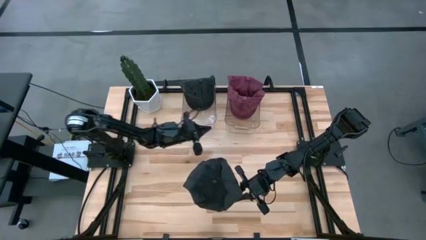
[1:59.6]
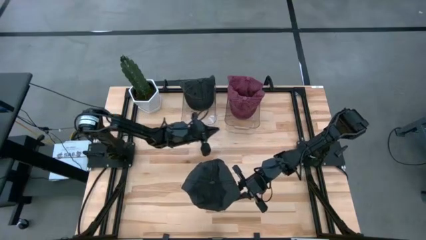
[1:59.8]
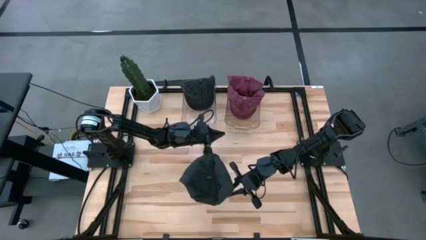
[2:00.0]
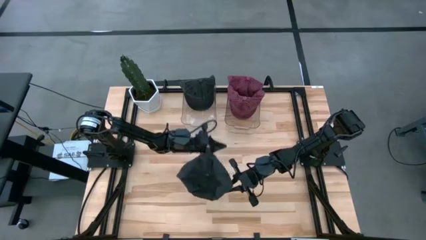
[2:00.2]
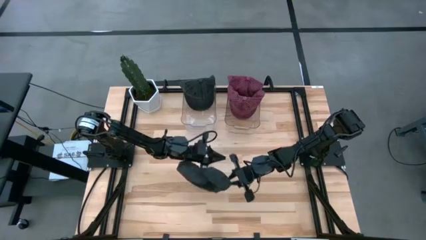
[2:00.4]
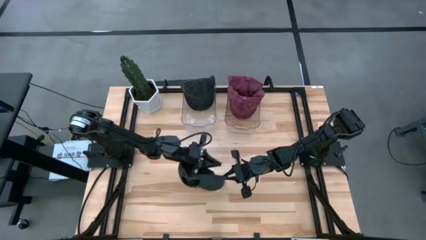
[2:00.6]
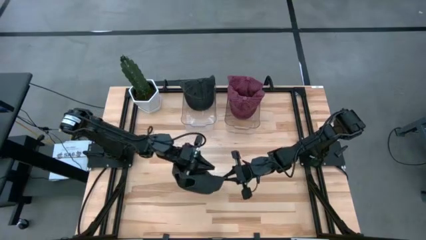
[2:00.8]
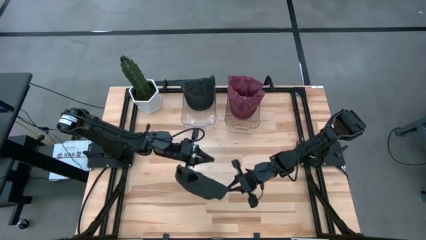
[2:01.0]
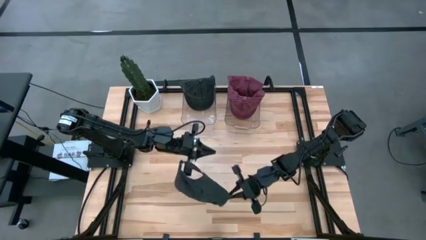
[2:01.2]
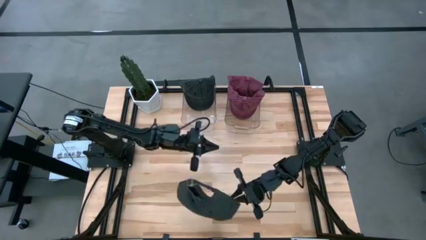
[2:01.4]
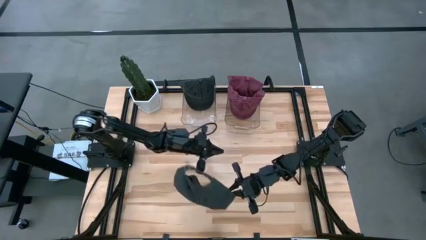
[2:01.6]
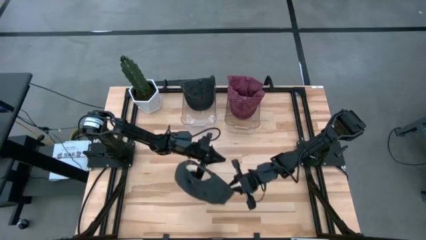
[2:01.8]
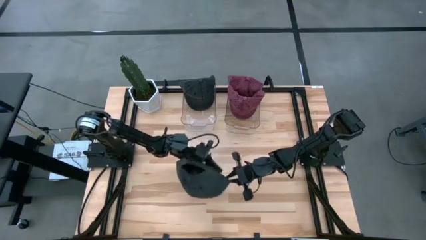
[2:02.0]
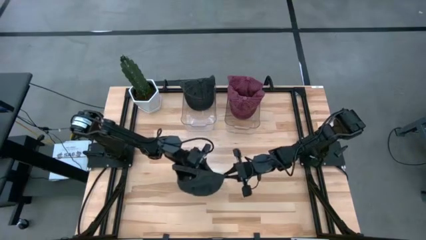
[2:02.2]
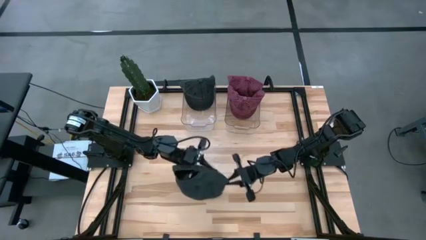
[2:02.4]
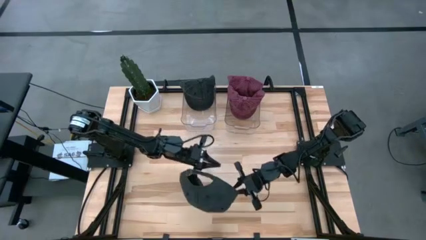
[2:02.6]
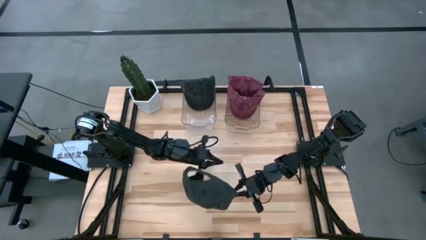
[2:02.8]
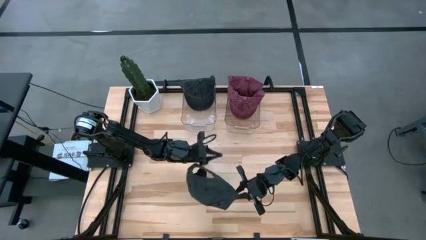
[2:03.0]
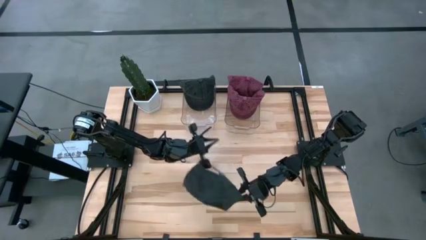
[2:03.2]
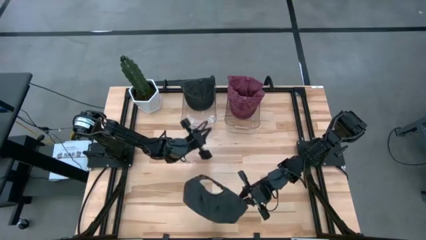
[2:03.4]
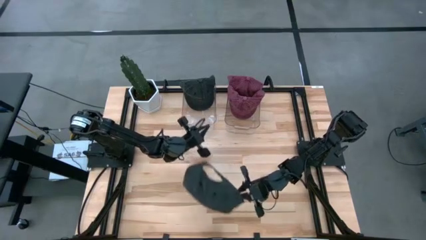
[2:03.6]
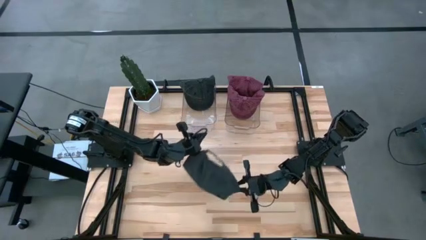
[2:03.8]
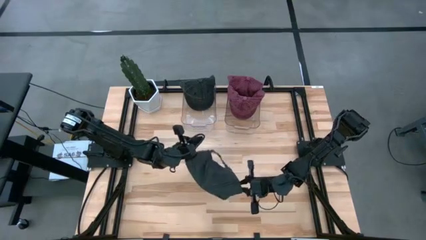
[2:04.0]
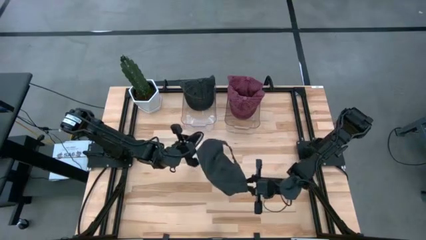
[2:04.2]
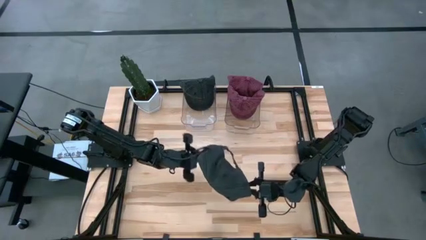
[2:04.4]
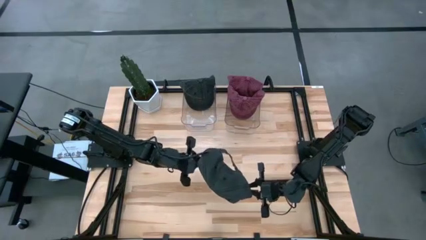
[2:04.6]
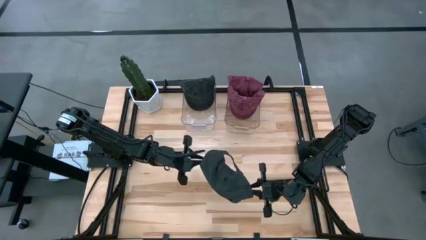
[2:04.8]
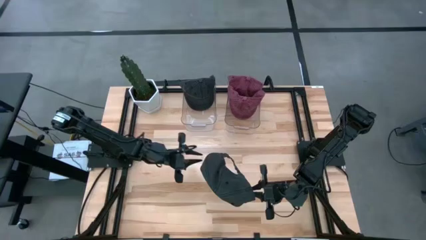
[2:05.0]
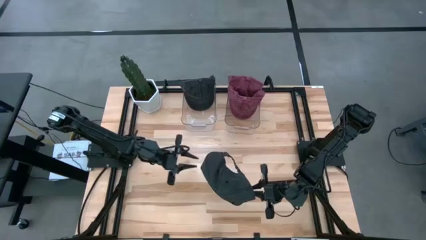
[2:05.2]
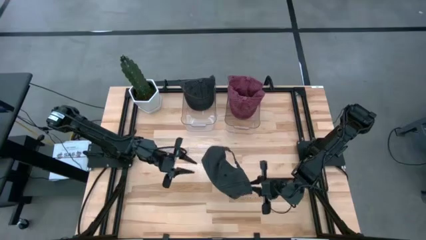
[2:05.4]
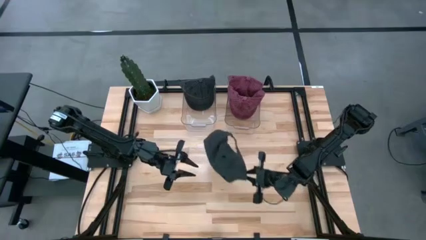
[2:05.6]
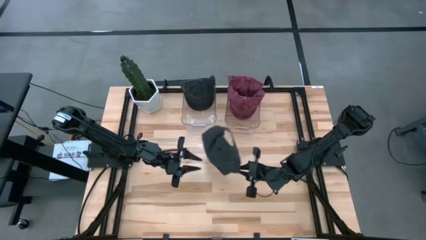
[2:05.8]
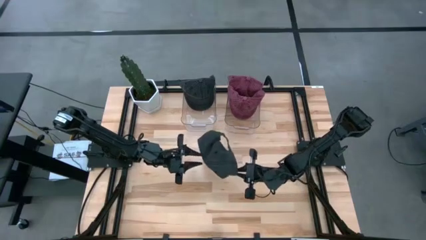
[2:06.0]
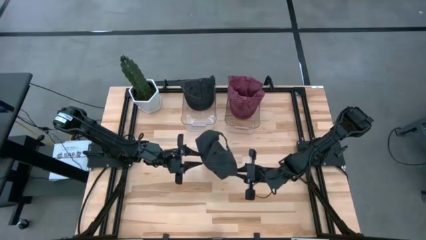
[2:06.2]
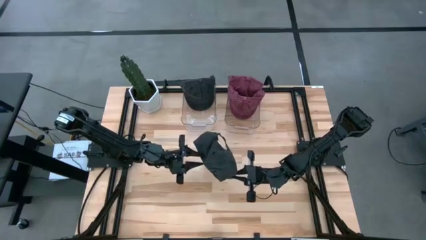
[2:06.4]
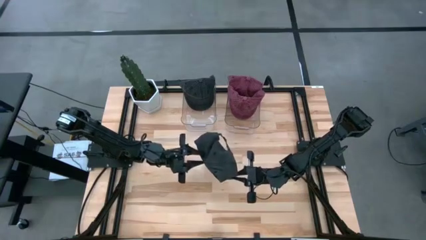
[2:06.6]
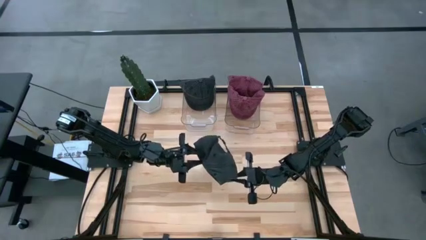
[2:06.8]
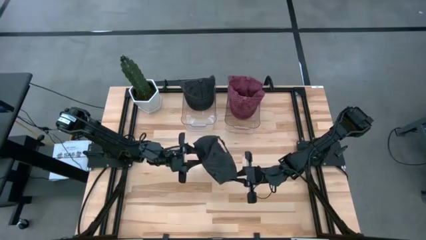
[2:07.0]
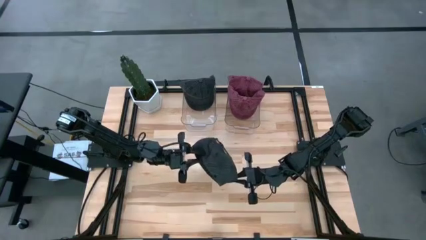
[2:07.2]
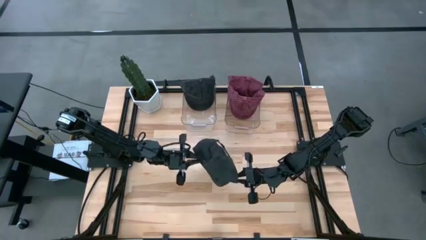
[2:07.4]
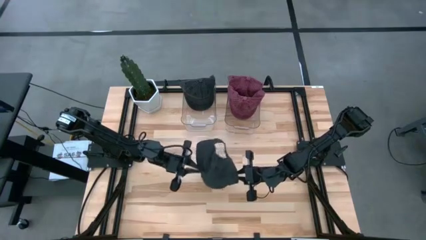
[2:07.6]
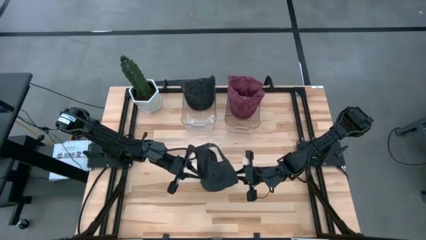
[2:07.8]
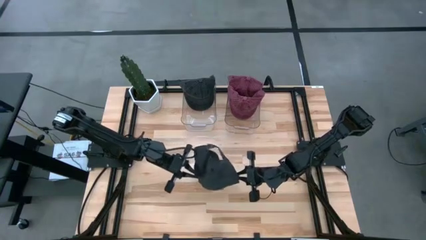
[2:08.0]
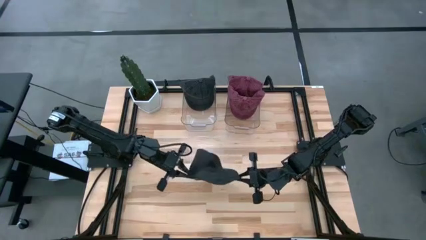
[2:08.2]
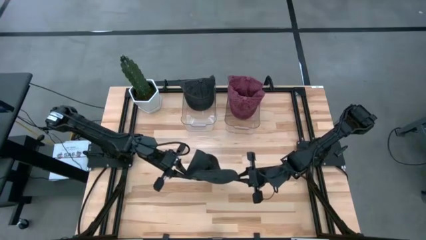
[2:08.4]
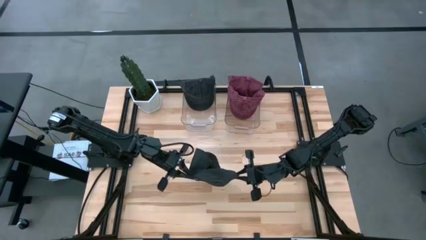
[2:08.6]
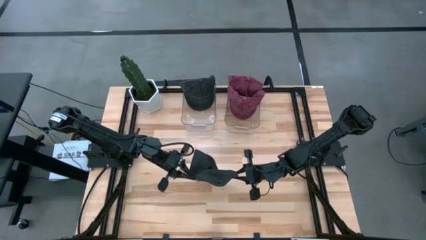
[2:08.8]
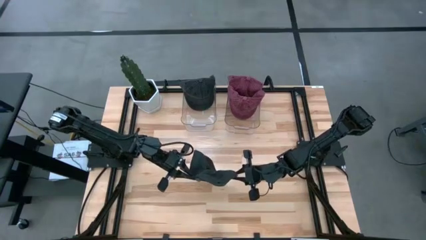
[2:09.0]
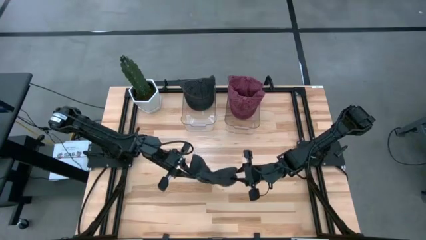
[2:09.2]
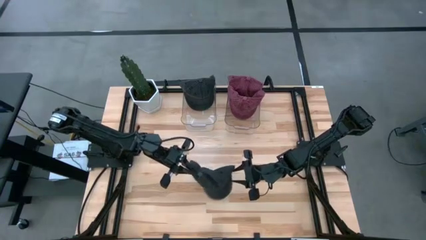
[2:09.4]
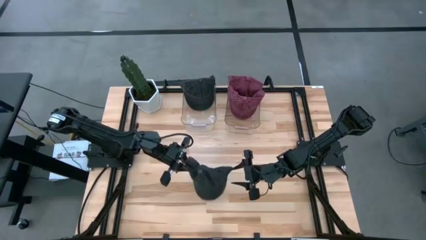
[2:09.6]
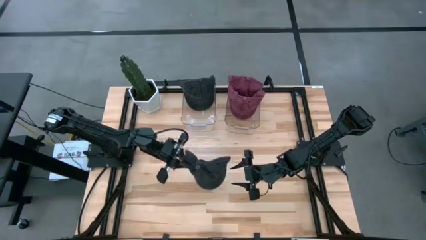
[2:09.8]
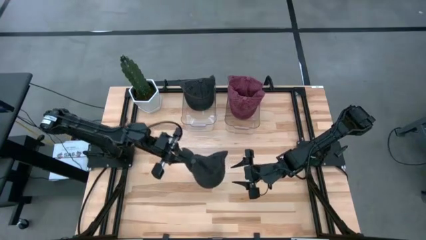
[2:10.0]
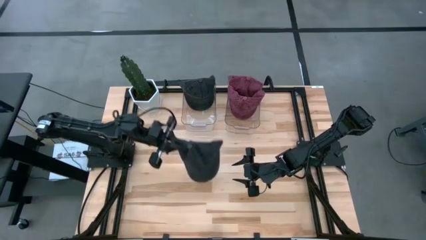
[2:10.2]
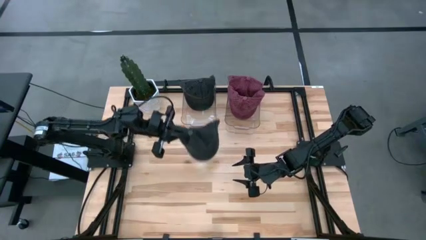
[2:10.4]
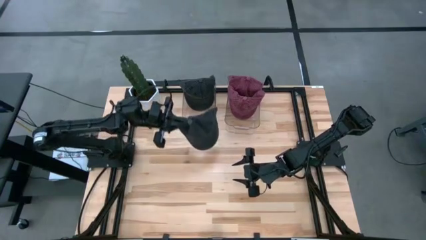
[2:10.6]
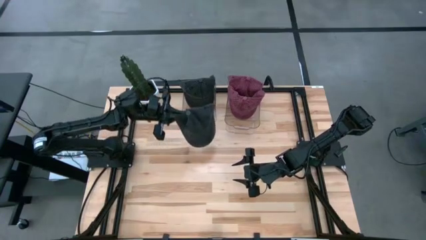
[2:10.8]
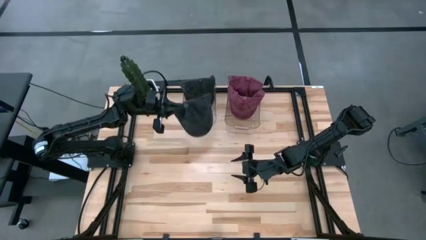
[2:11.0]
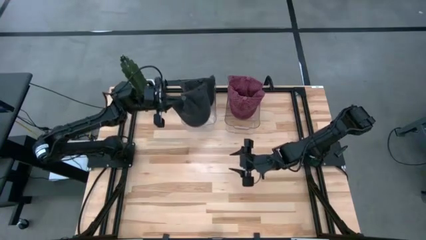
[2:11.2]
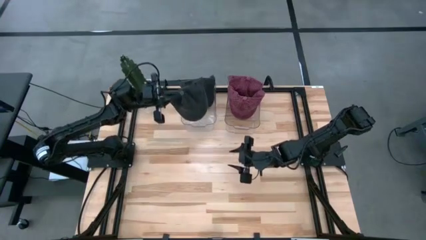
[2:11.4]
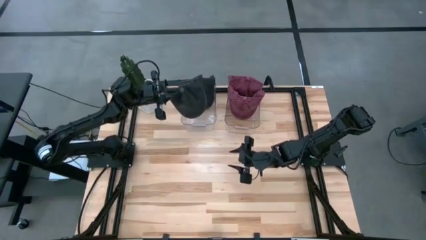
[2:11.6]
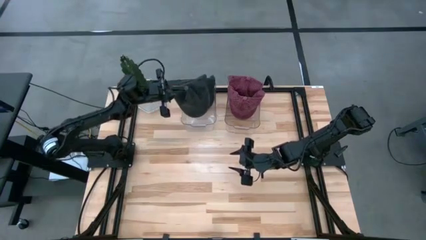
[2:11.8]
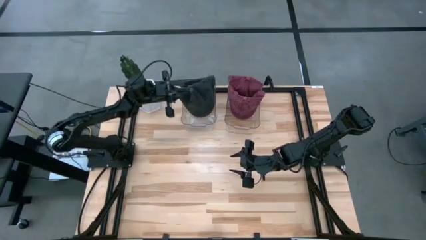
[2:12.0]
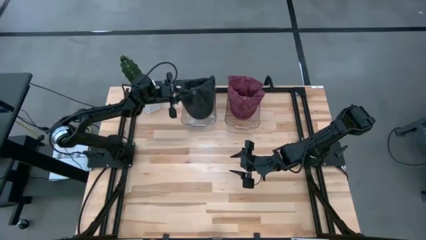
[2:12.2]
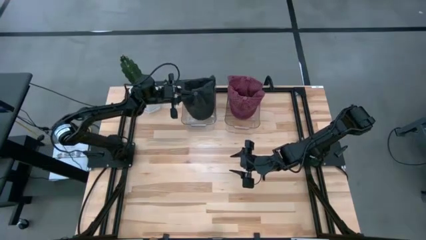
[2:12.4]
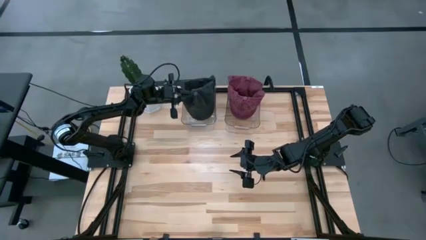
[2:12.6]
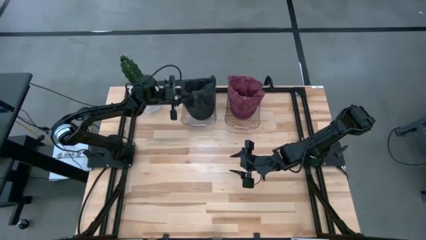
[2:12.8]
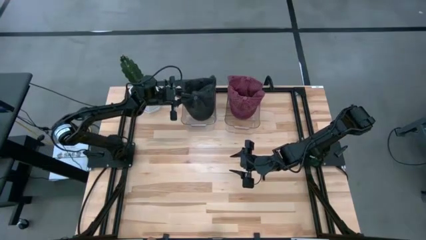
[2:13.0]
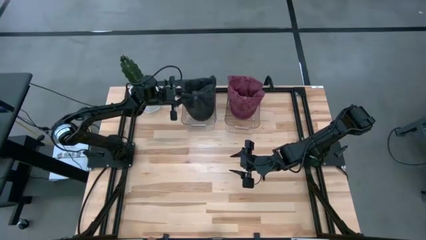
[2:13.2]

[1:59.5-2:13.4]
Task: Pick & Place hat
Put the black head cap into the left transparent bin
